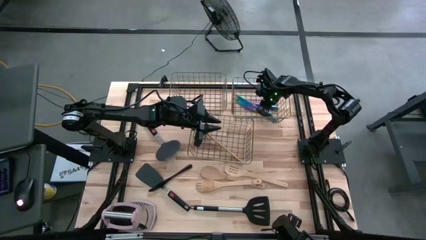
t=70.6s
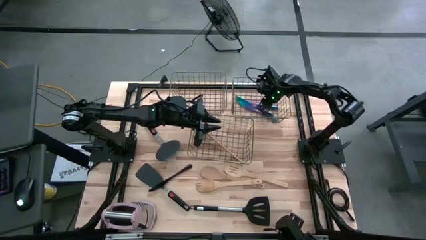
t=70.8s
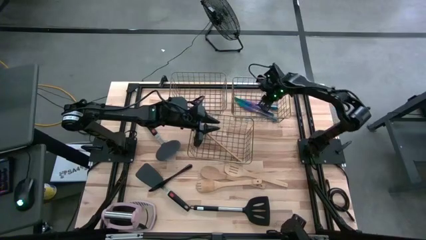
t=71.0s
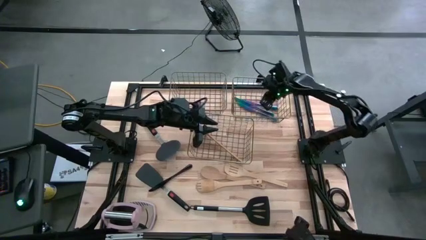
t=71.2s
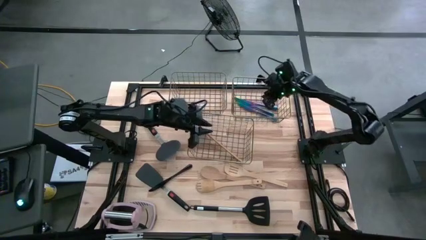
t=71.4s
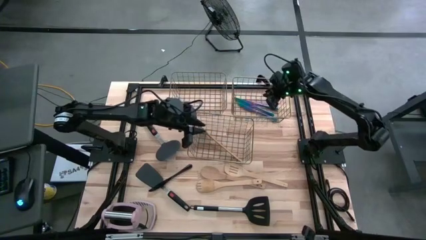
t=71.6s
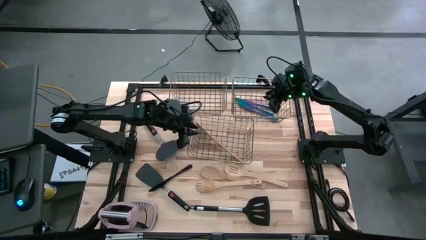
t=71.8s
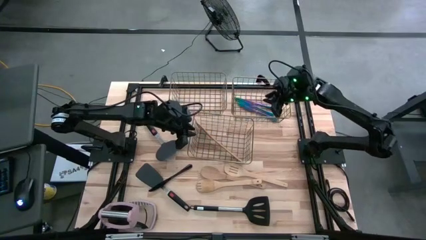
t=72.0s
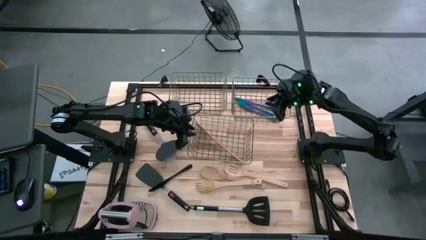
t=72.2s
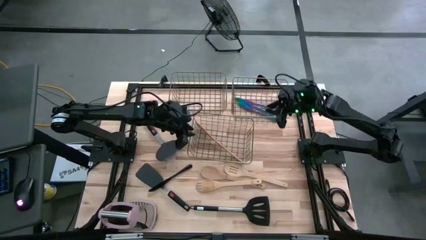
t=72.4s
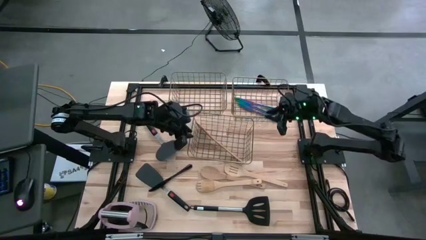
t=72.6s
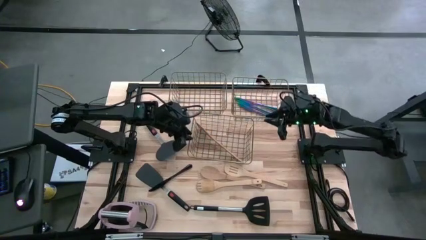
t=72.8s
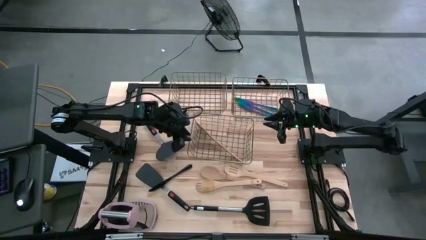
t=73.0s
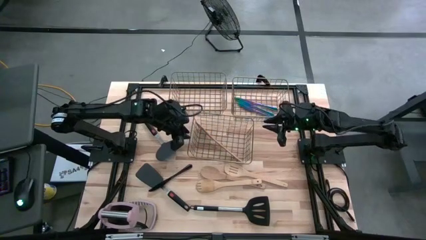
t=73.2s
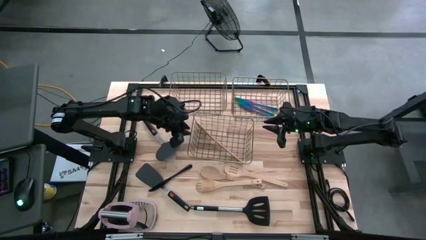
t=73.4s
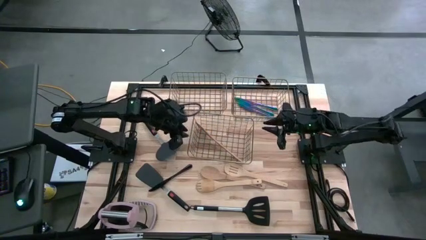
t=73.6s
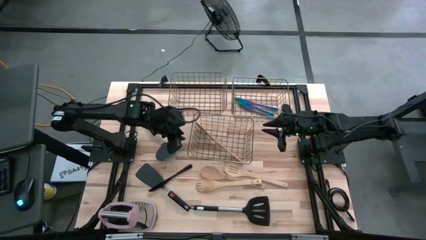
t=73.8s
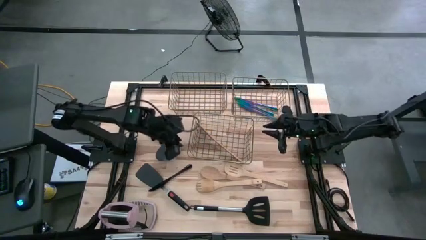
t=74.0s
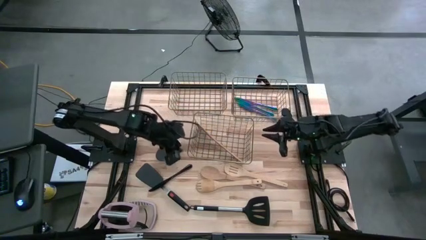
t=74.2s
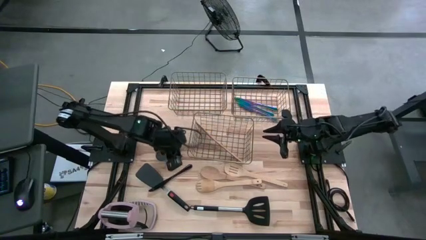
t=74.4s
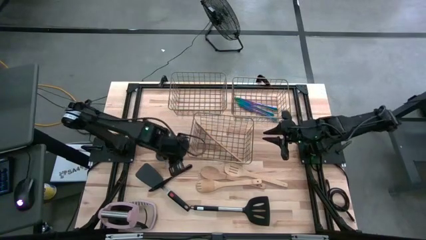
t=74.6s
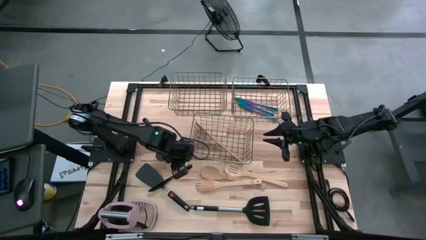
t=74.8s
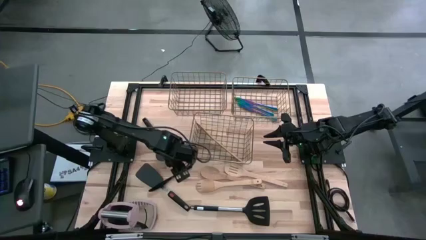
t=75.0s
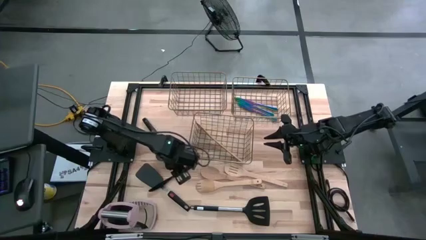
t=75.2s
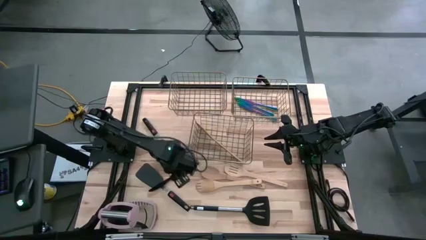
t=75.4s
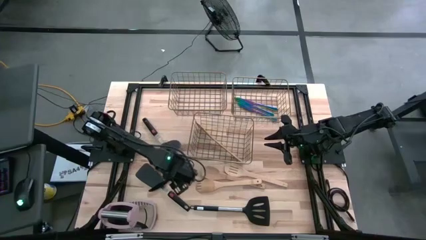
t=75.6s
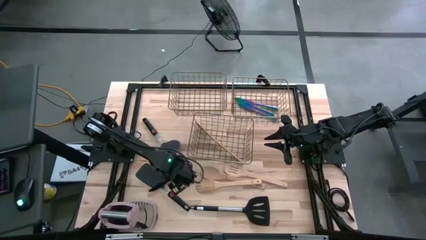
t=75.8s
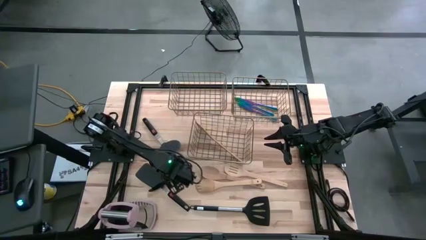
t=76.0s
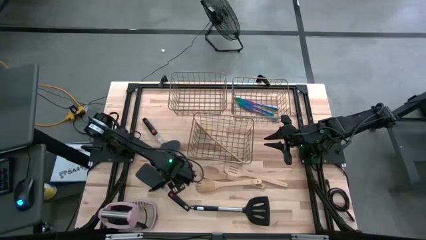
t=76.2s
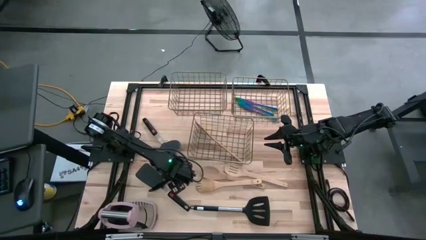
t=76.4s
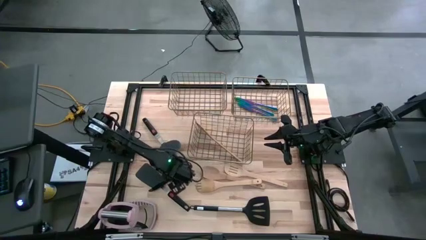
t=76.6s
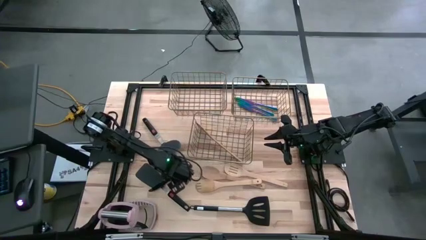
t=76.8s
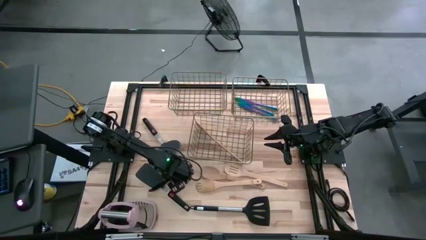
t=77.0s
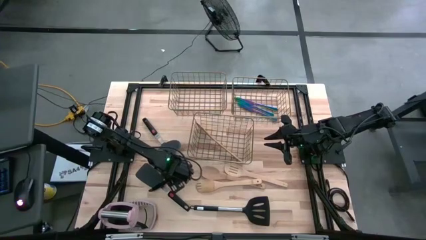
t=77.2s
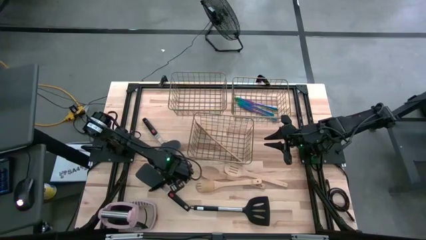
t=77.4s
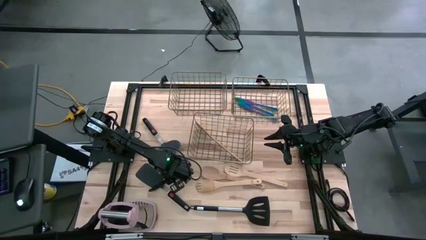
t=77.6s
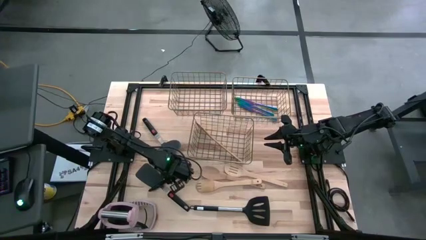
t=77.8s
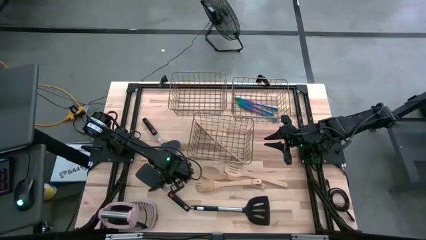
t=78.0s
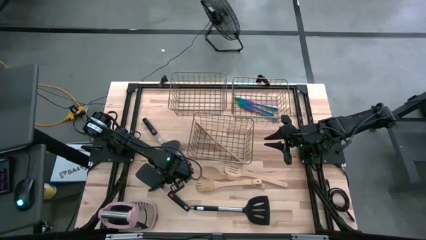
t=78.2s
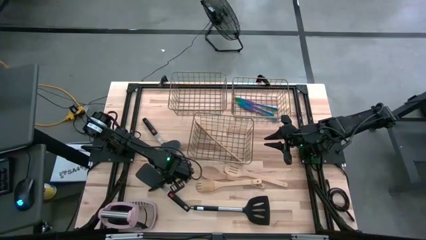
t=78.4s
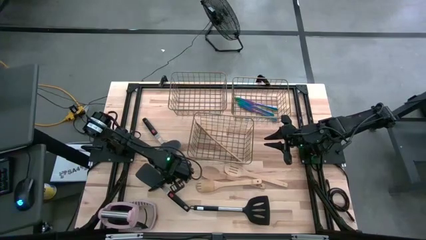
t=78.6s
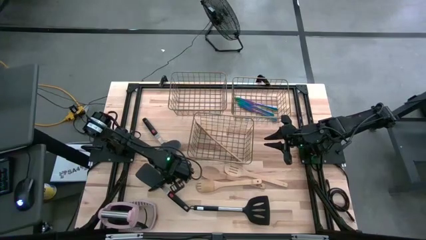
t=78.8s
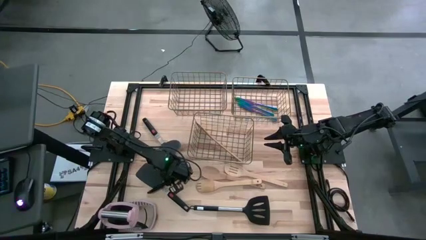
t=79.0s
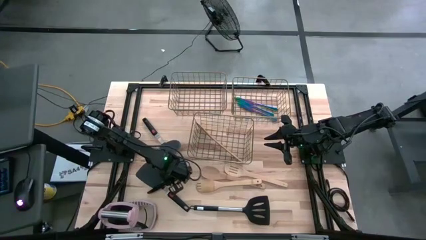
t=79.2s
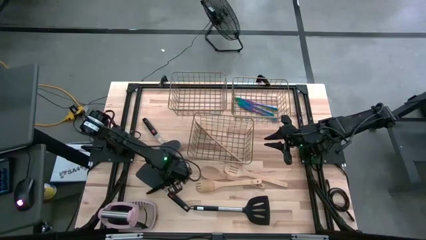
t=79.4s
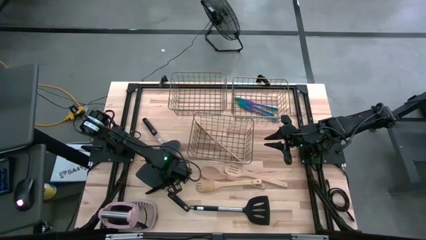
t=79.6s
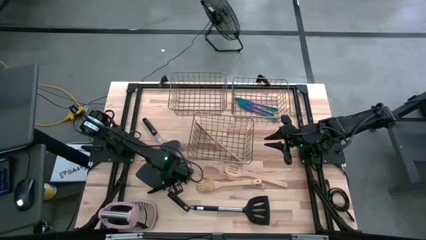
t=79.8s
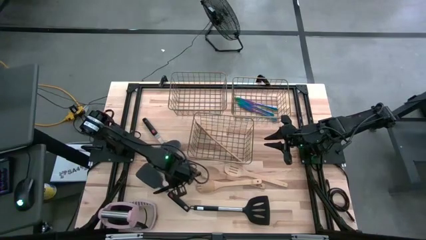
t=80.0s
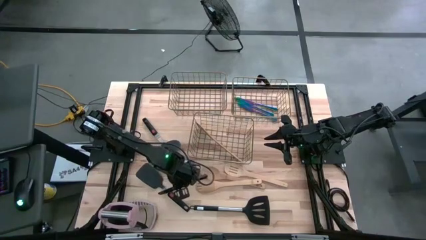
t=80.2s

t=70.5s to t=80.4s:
Task: Pick & Place Kitchen Items
Put the black table knife into the top right wire basket

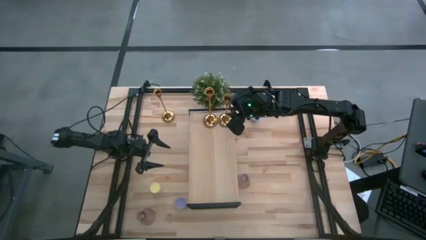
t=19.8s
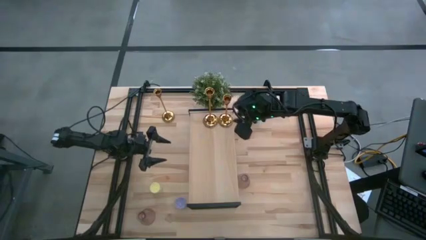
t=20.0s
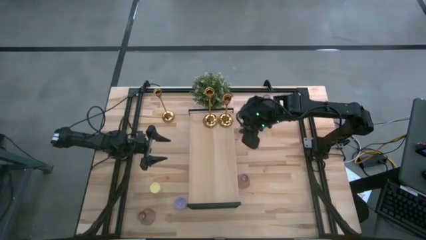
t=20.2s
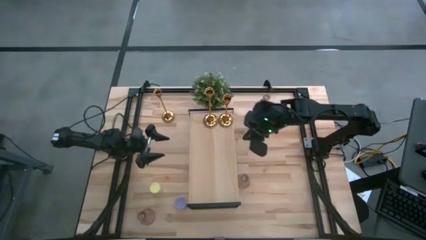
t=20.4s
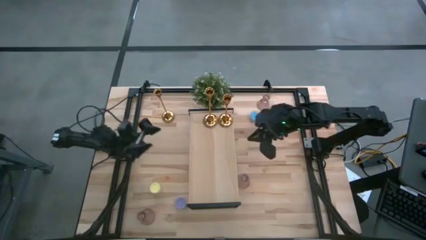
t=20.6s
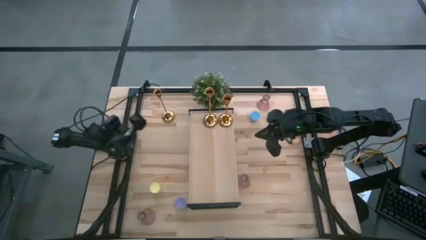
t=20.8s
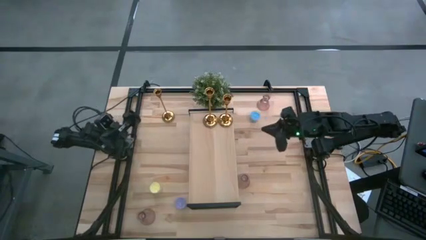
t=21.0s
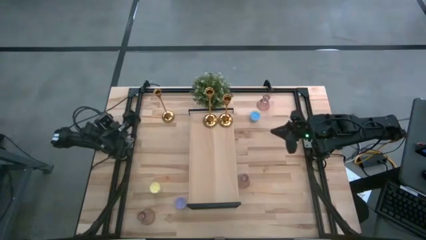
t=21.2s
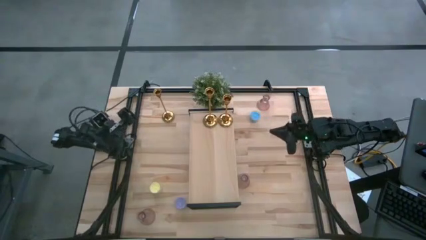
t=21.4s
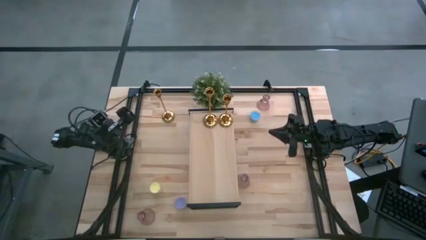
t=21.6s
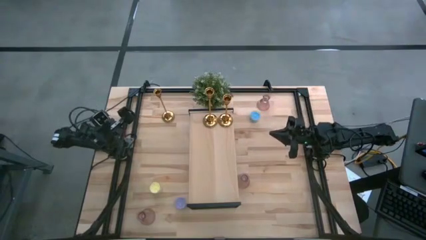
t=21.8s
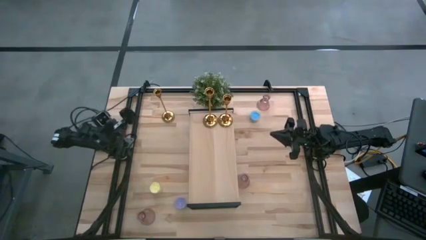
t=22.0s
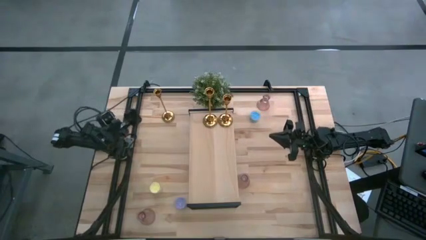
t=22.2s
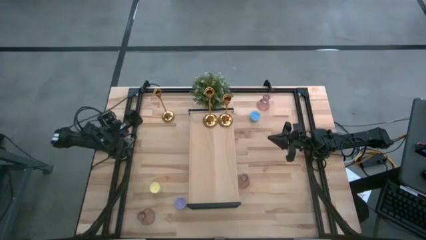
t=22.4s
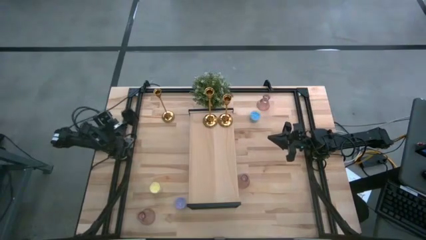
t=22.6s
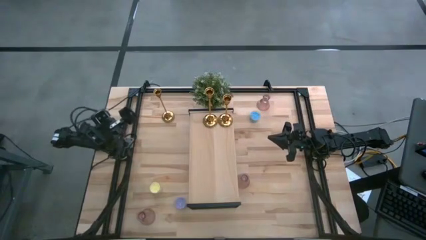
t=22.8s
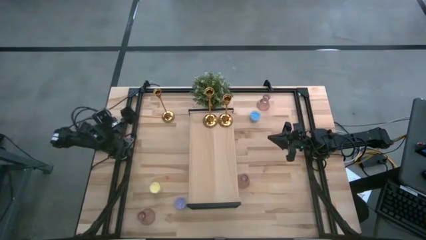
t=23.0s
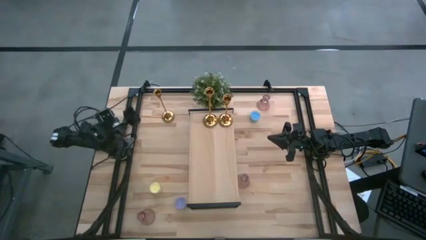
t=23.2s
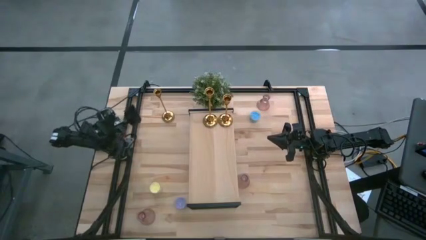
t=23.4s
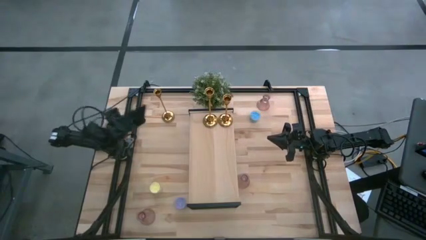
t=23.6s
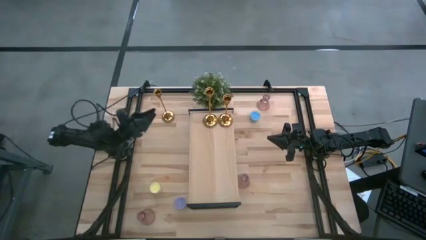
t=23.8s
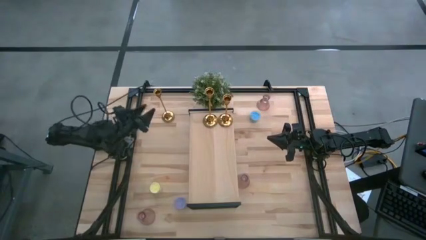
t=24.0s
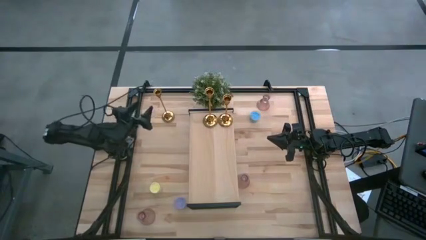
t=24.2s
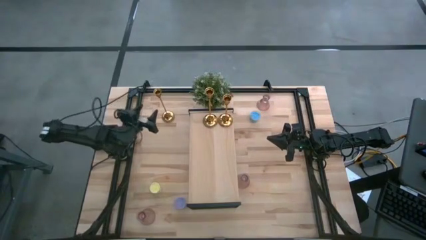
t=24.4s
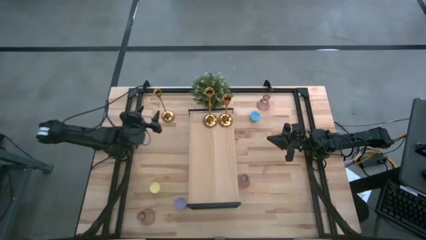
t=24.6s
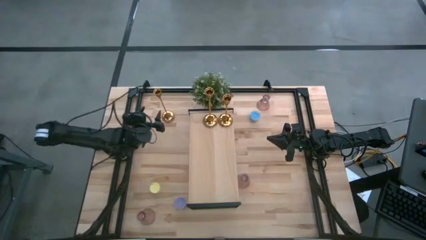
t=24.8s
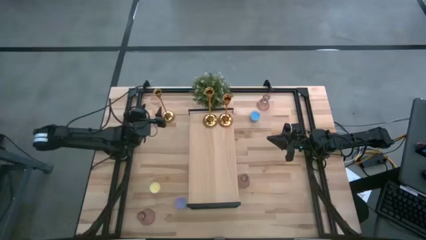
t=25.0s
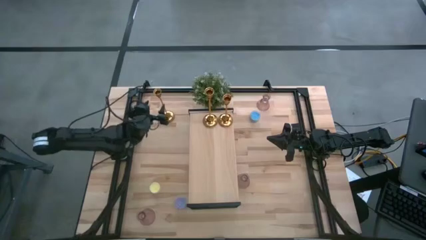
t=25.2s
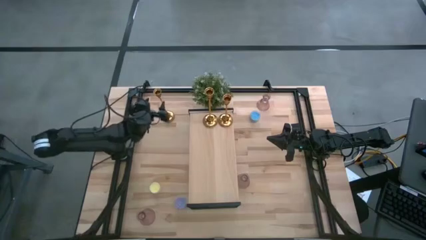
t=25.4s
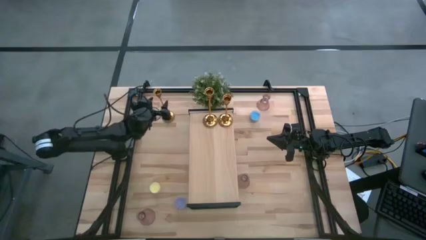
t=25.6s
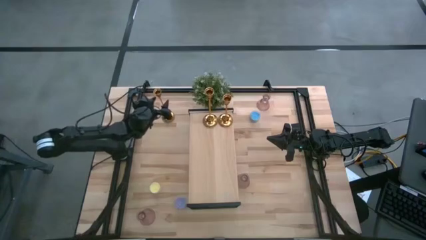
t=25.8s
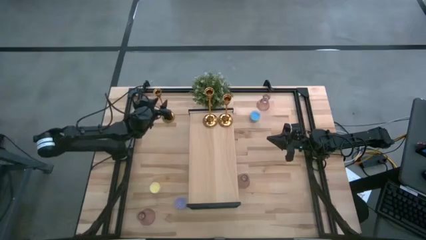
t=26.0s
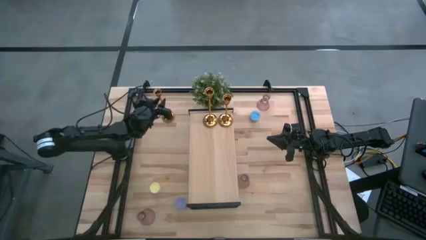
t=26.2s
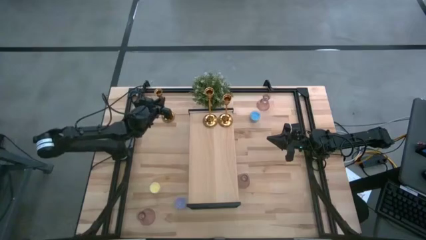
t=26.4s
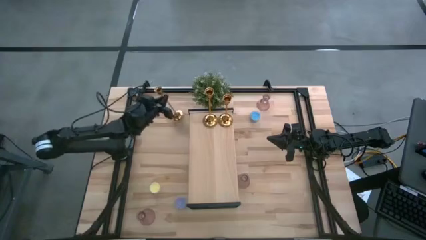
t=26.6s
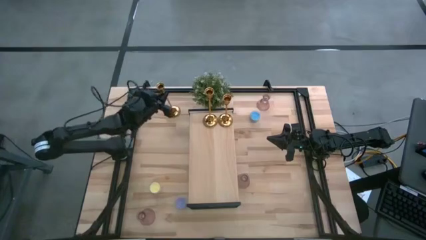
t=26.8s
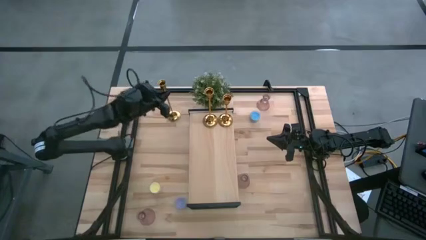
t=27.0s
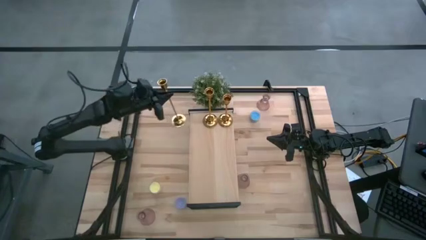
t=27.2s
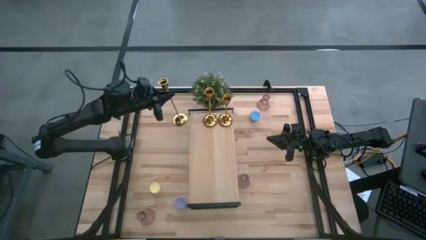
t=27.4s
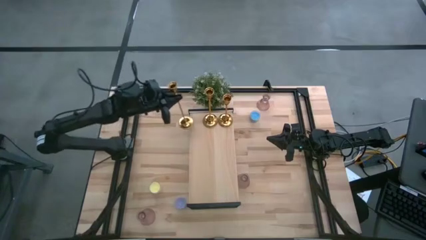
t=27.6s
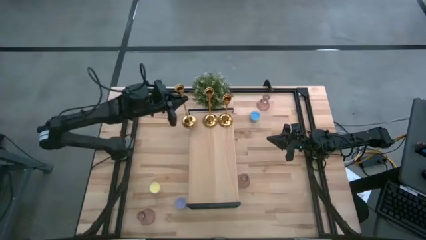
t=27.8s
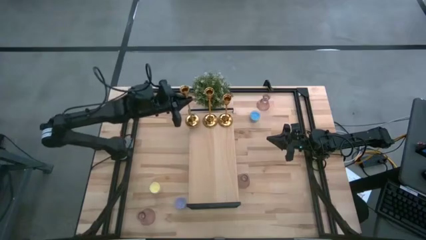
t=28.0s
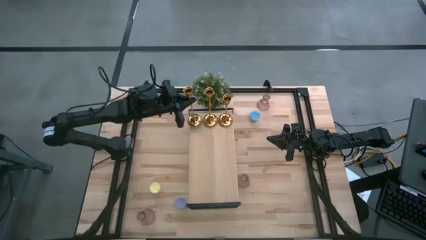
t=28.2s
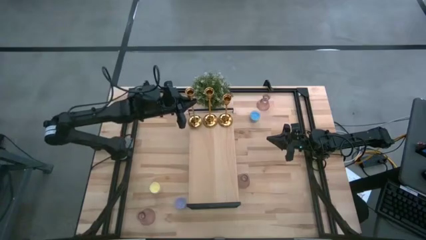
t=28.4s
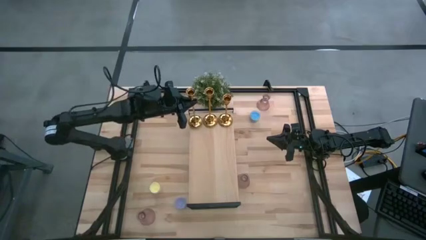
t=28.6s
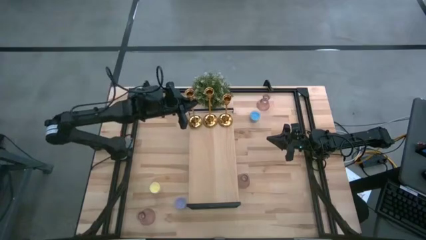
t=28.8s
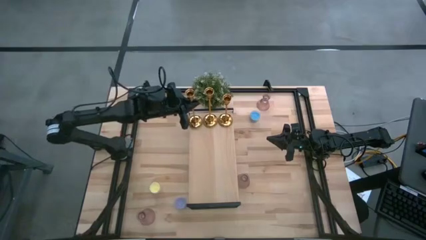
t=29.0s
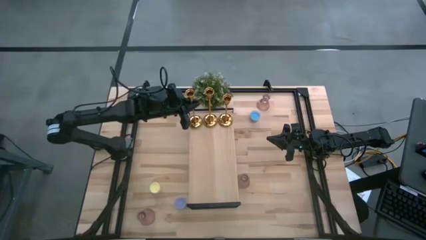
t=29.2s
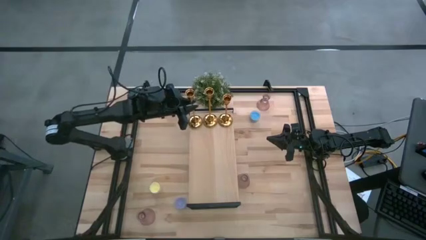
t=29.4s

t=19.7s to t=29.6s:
Task: Pick & Place candle stick holders
Put the gold candle holder on the shelf aligned with the gold candle holders
